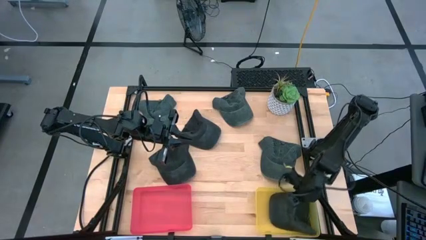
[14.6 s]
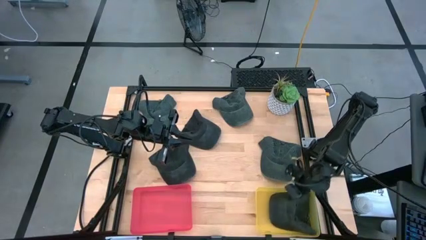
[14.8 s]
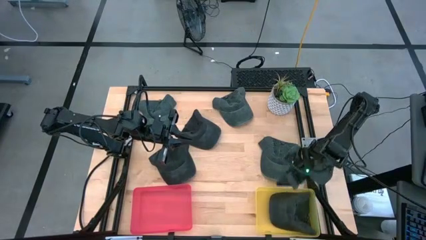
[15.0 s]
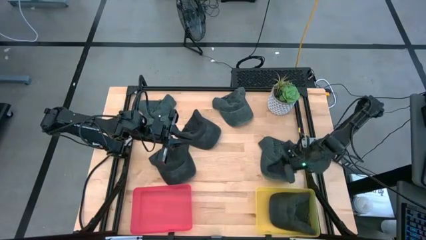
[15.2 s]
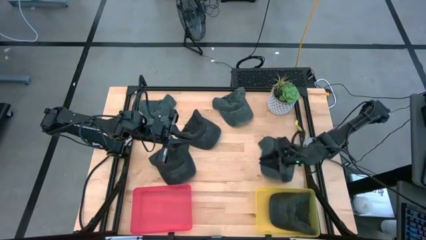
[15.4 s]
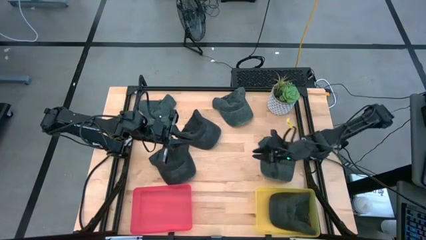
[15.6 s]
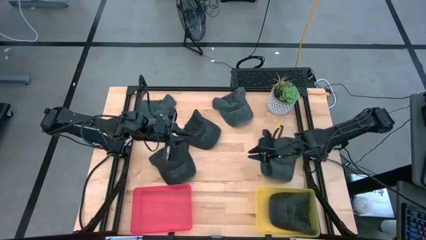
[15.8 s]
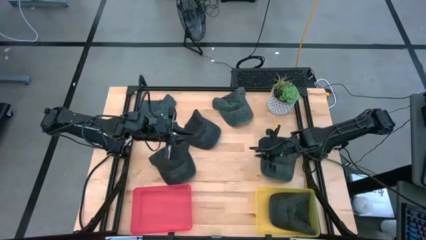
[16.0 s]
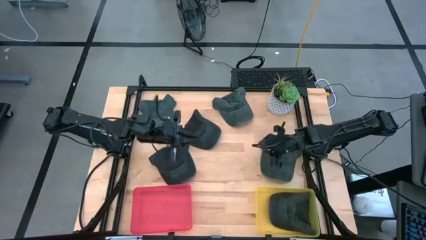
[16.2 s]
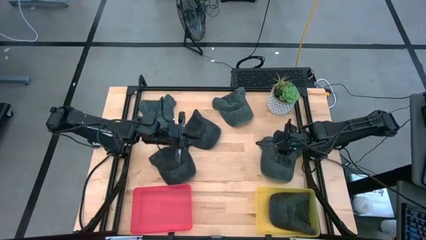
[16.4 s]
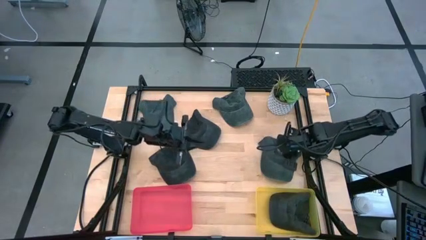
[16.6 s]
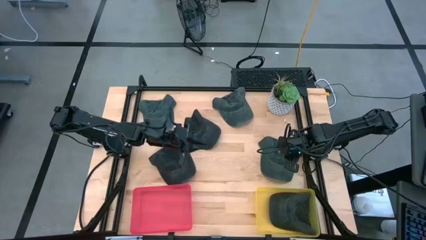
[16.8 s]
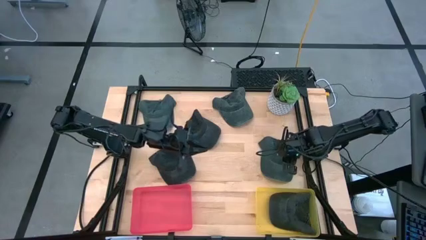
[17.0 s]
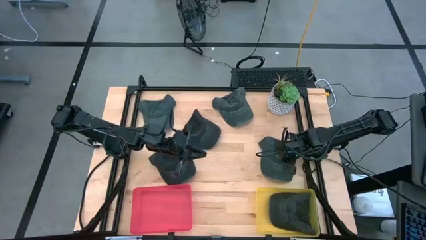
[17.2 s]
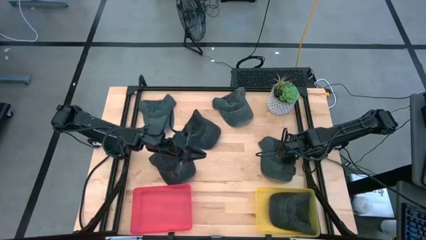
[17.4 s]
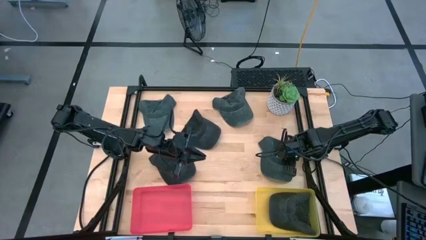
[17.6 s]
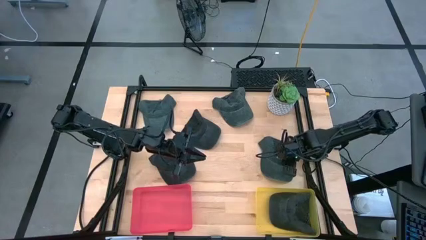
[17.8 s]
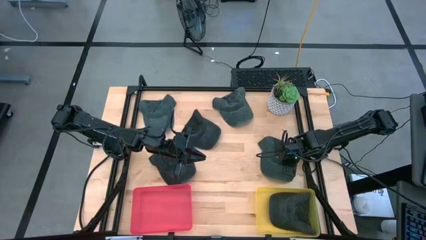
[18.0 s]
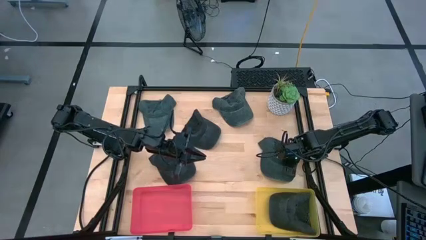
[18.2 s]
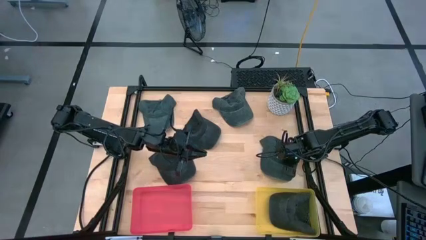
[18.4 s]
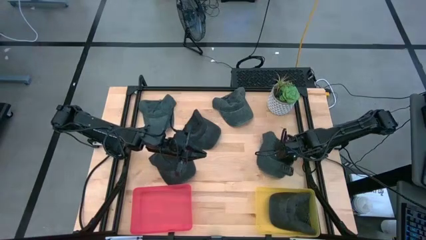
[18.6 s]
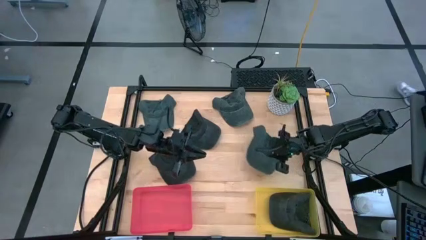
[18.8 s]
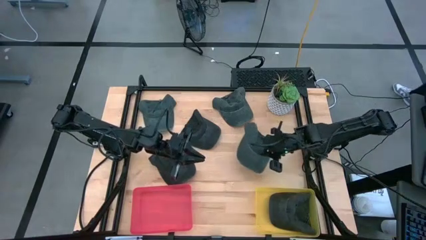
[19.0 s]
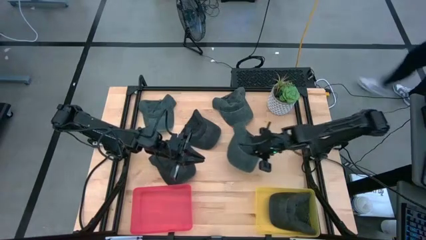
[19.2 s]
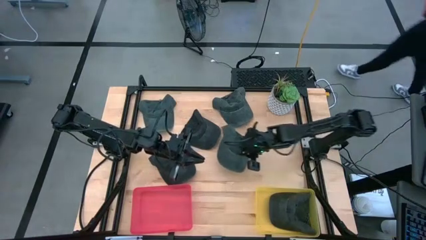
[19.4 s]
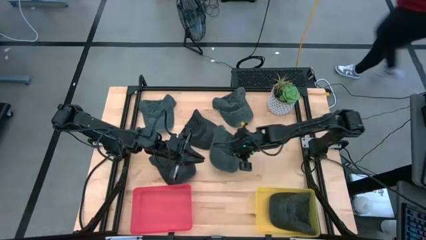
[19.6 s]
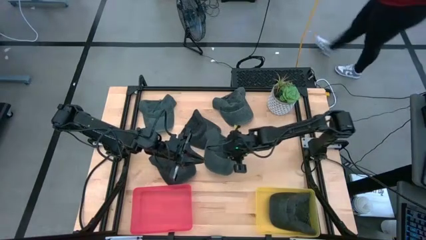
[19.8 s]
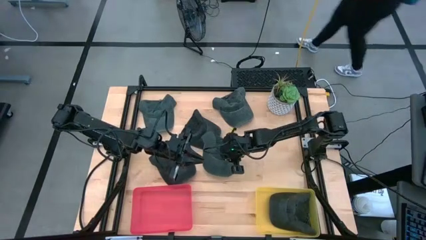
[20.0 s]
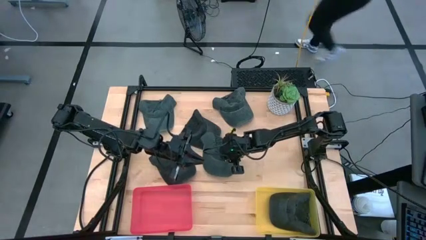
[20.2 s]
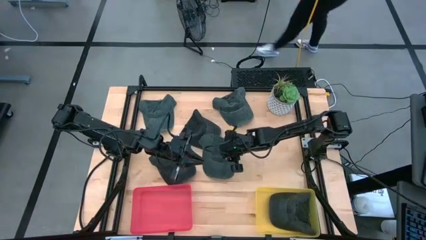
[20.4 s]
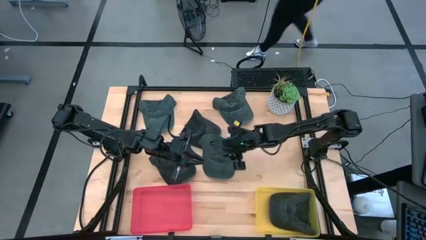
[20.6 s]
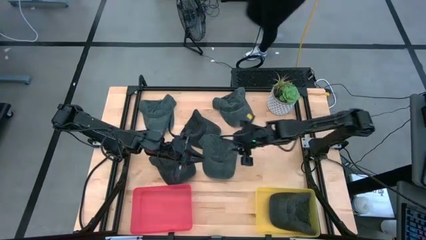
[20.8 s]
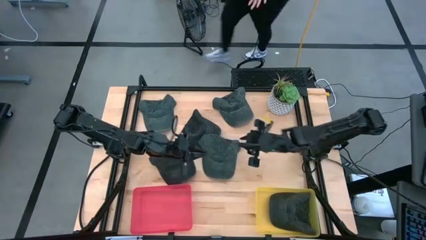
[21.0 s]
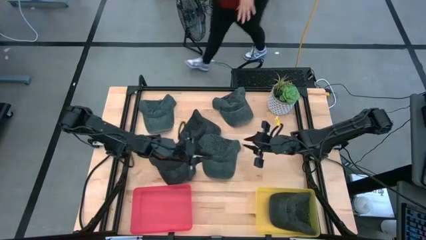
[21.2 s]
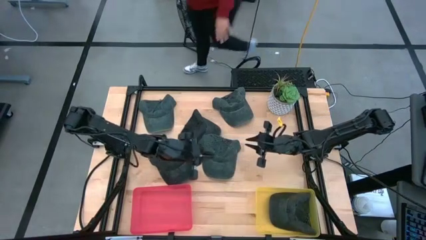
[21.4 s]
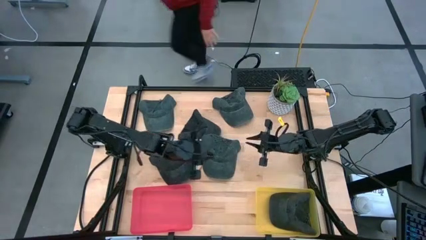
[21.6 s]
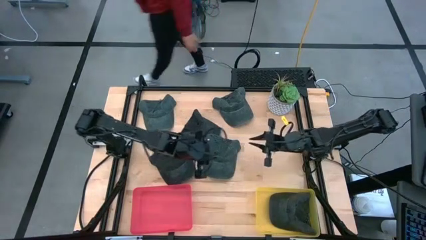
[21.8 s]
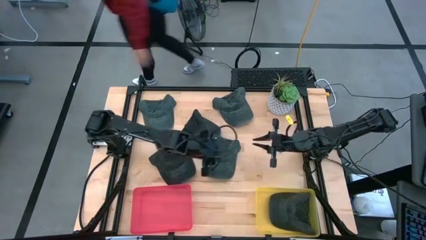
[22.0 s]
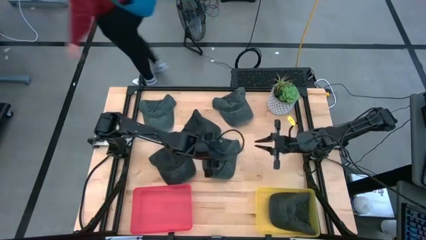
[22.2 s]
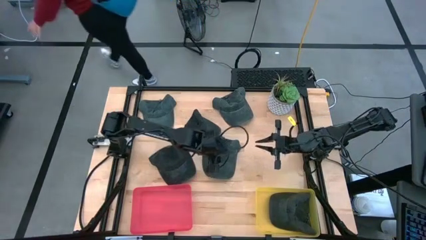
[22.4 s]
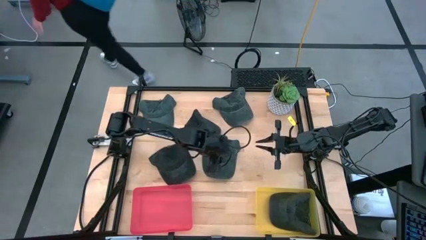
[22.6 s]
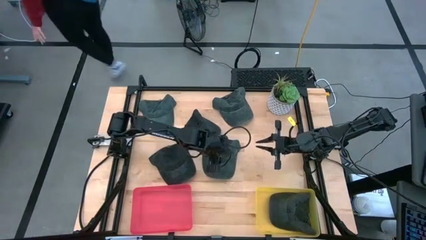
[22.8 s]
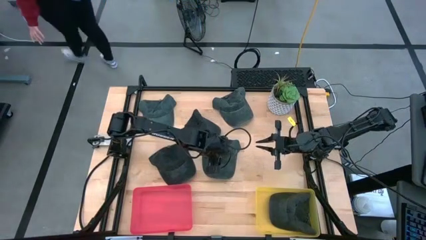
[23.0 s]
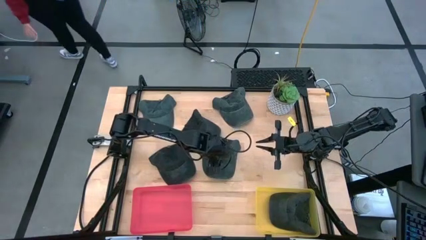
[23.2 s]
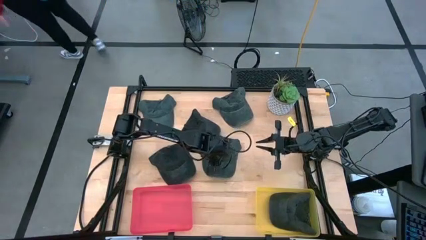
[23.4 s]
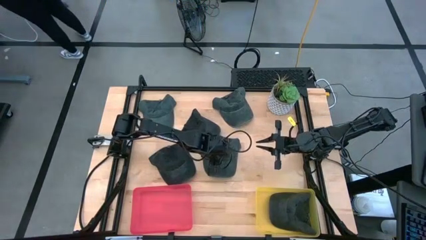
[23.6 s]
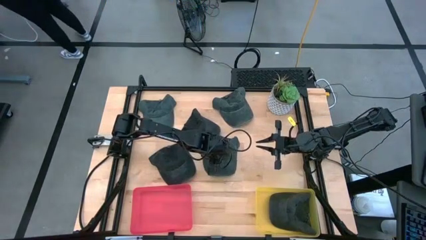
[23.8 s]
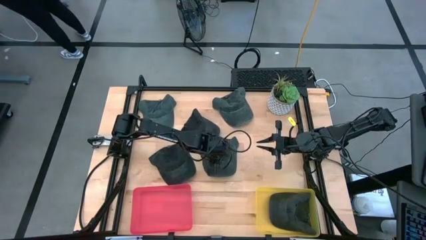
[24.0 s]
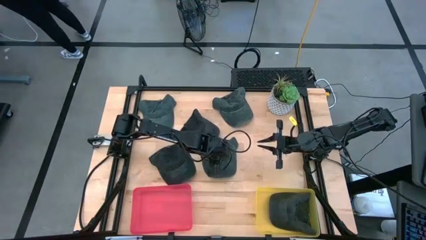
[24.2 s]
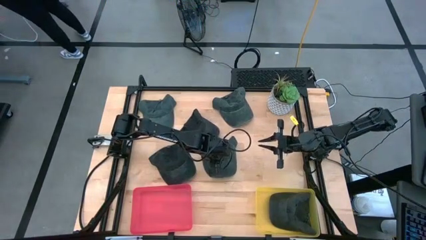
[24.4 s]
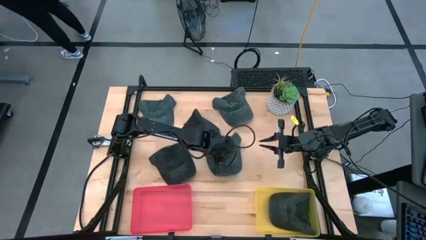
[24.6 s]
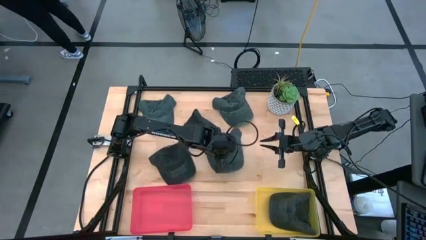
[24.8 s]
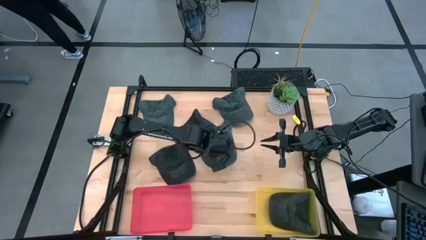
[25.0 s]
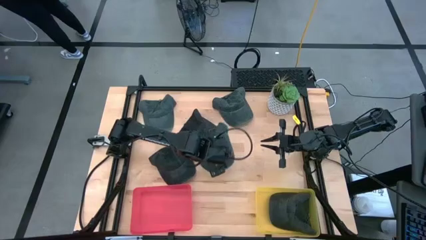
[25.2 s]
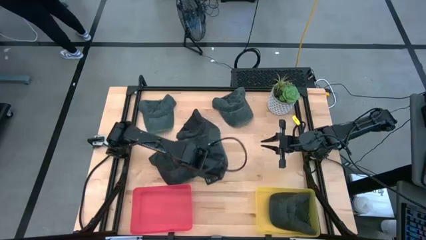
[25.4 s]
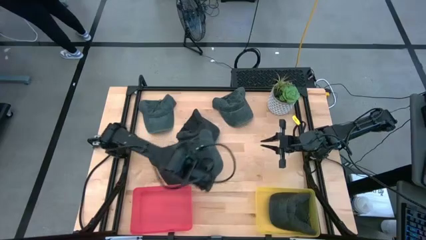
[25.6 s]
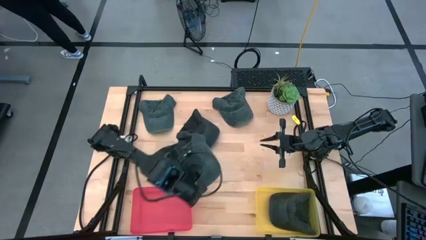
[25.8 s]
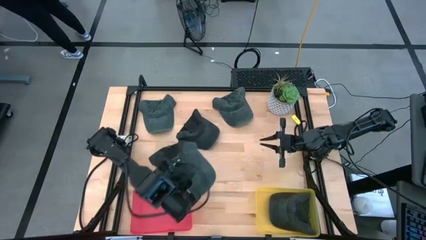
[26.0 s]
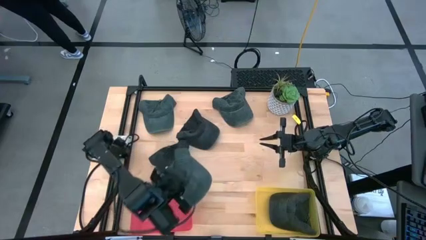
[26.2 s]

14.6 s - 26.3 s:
Task: Pick & Place hat
Put the grey cap into the pink bin
